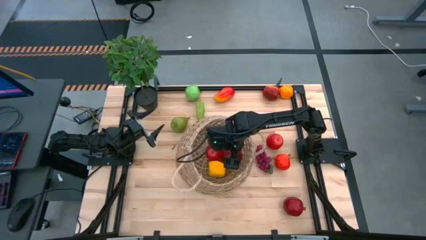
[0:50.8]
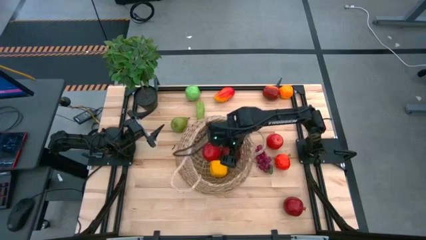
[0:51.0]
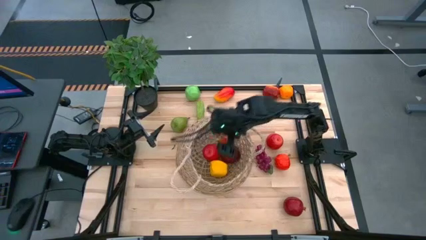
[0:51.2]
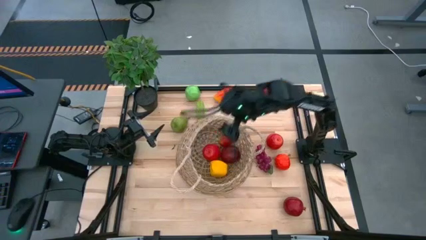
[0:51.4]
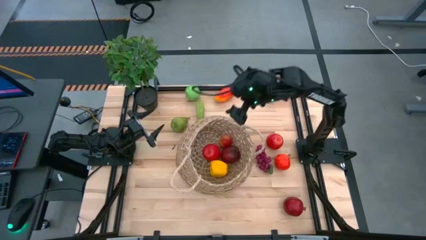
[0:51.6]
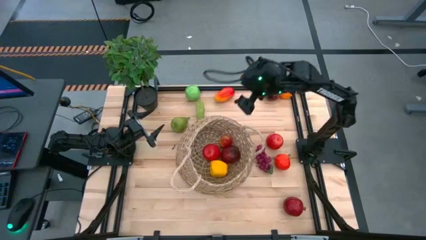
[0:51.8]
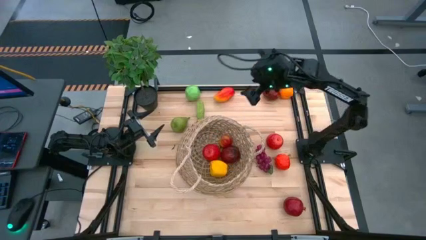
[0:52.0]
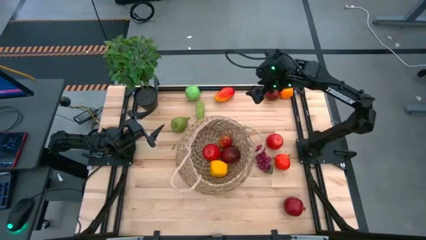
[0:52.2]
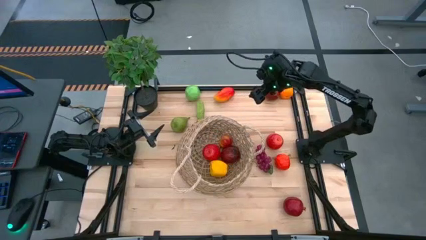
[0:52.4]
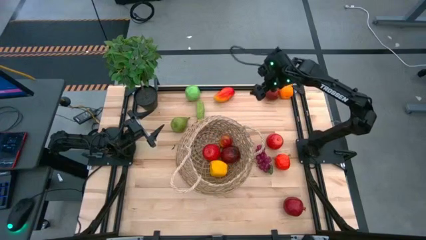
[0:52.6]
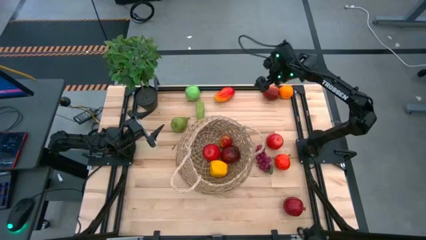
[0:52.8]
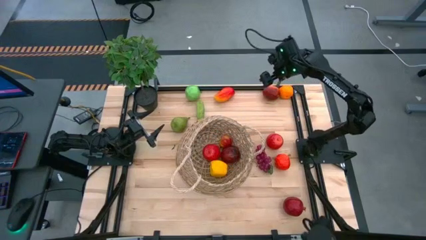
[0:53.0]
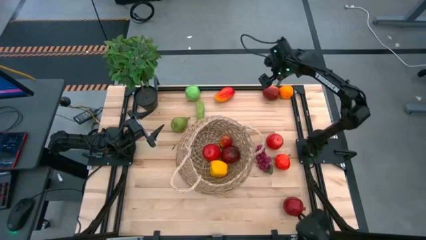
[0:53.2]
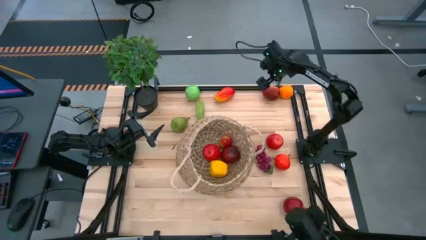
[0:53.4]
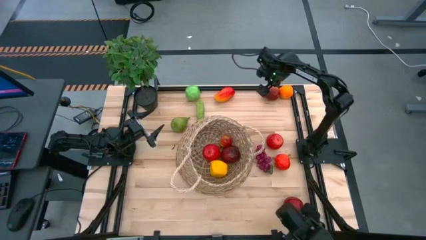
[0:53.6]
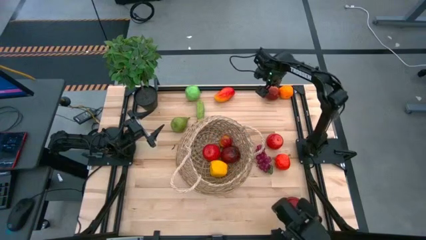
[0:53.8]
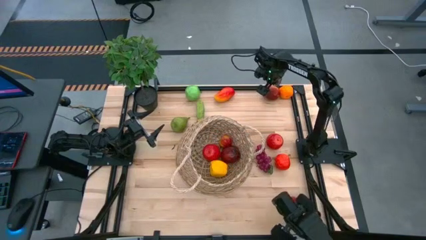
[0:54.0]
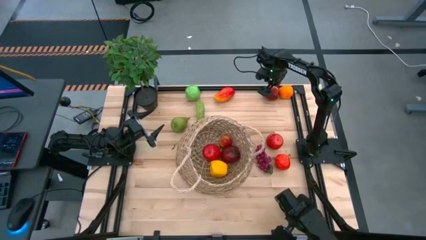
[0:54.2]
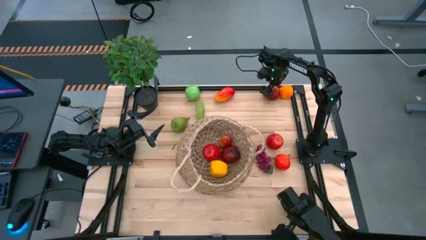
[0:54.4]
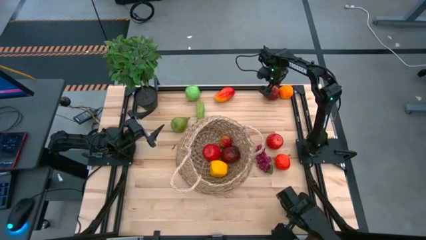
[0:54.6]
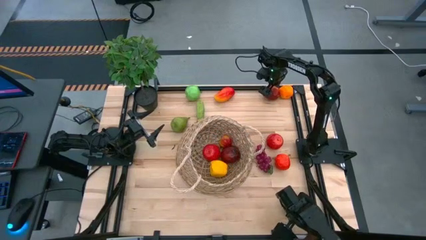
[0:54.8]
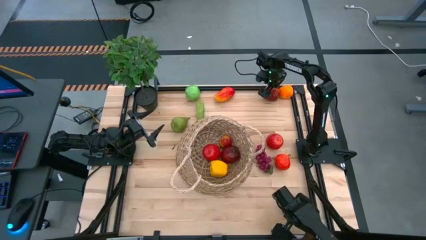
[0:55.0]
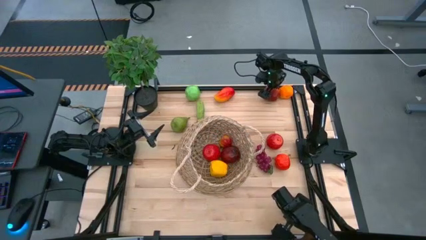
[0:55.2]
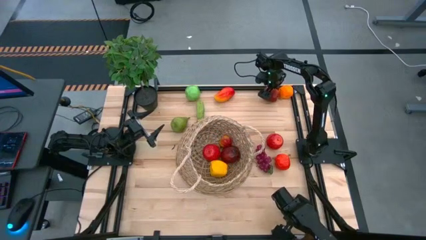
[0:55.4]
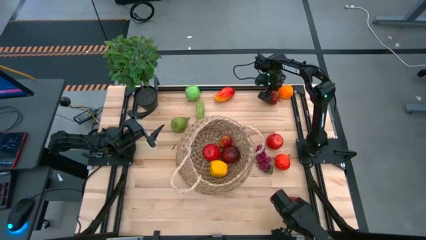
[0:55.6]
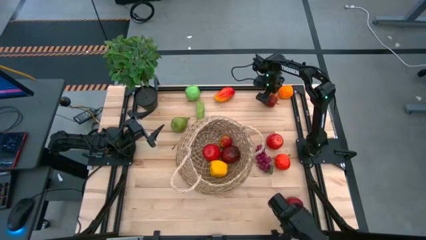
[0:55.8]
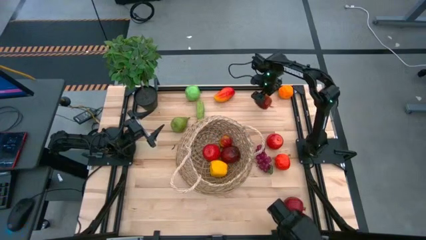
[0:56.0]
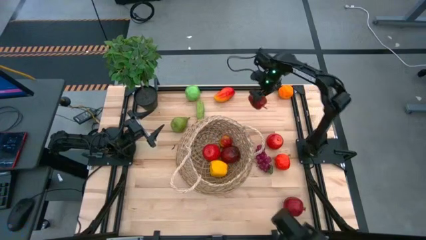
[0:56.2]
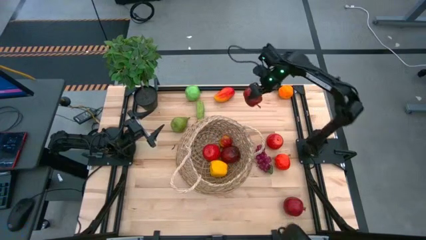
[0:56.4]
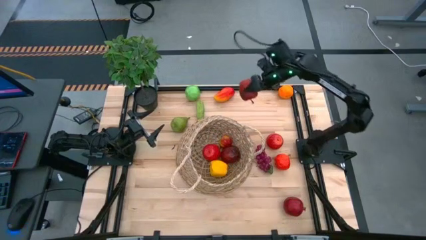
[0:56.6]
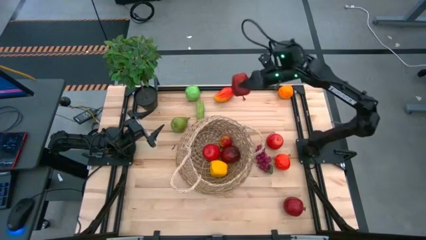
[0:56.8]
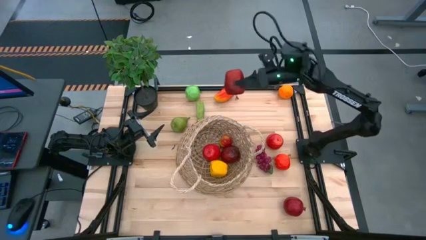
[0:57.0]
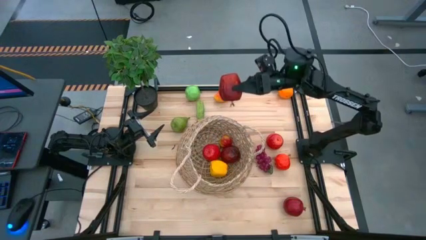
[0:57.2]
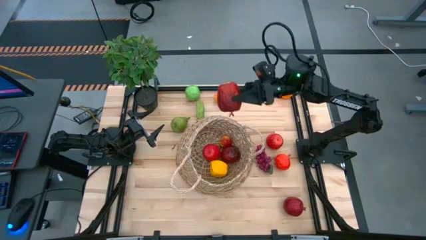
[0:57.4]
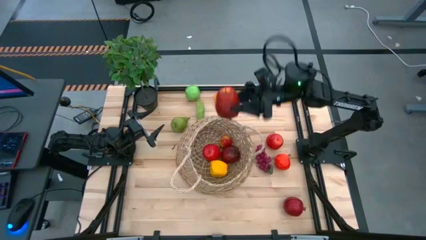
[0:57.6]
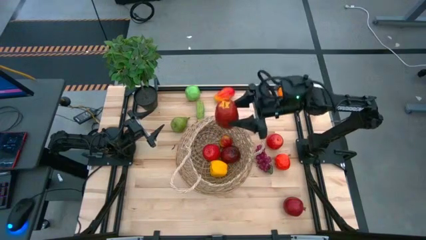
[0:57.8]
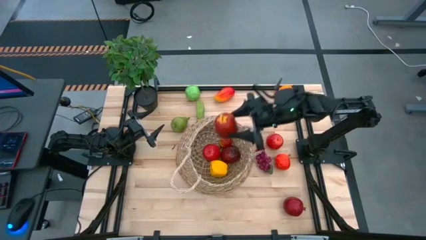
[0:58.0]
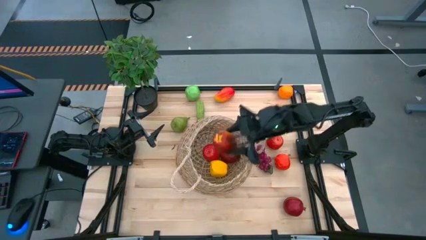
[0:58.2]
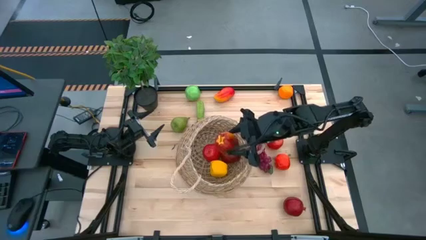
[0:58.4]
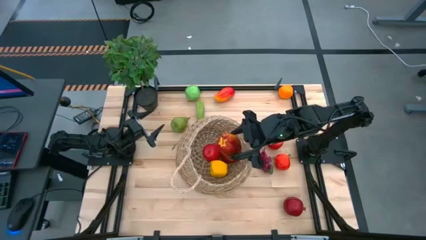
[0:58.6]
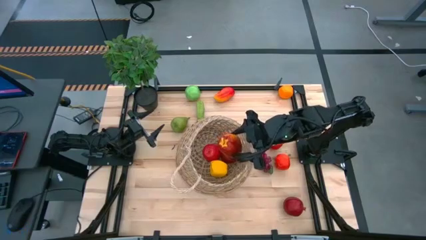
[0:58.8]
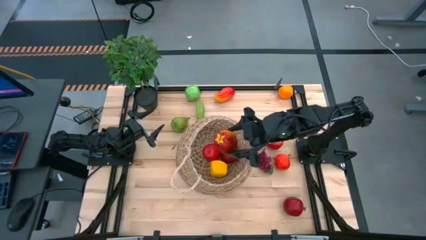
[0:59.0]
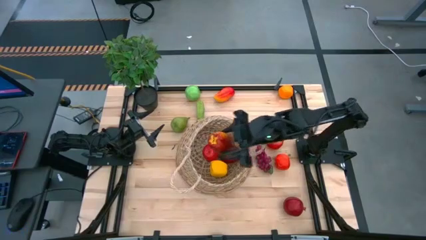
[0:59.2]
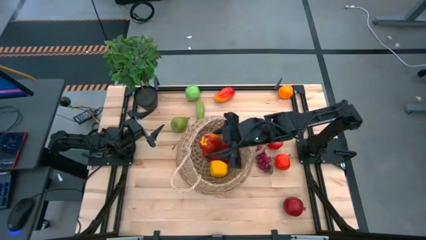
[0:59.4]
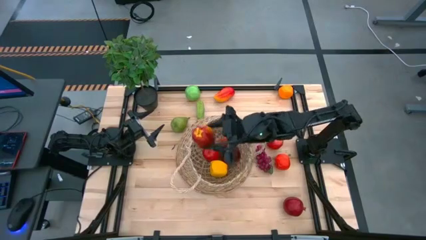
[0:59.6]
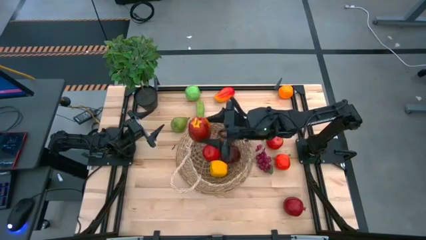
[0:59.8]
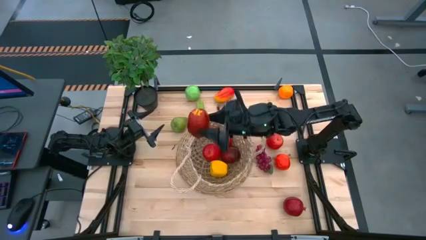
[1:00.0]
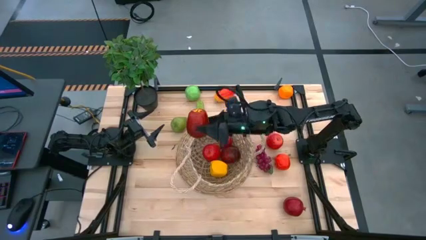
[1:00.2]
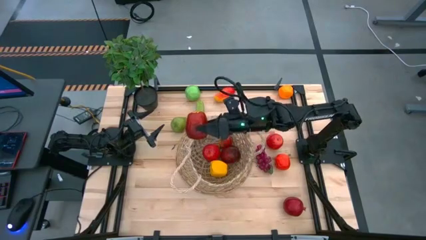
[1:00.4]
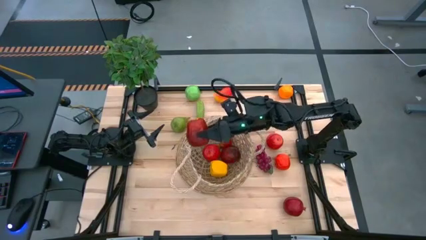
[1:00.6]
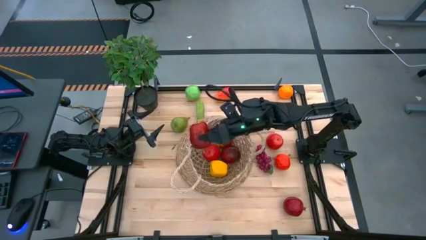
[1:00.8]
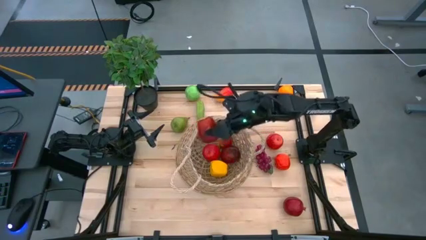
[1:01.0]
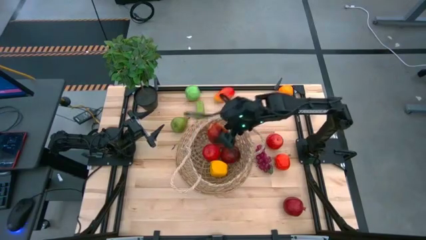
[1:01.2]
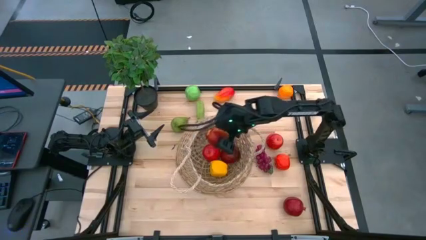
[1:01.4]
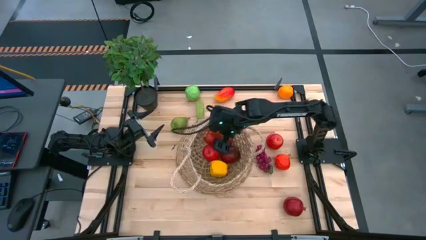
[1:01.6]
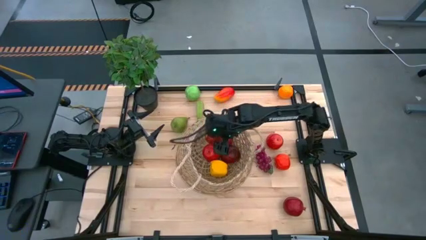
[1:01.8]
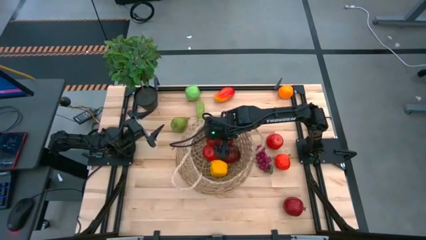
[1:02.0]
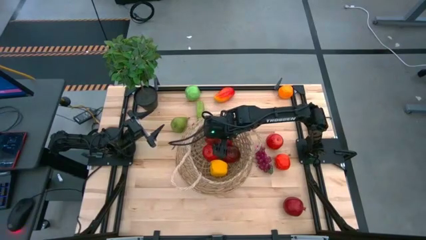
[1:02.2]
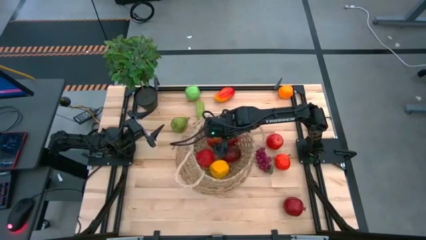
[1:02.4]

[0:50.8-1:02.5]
Task: Build produce basket
Put the top red apple into the woven basket

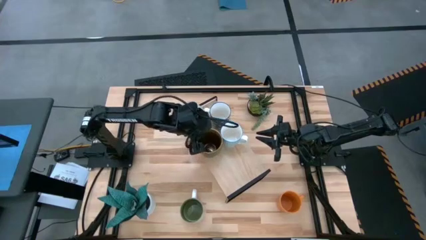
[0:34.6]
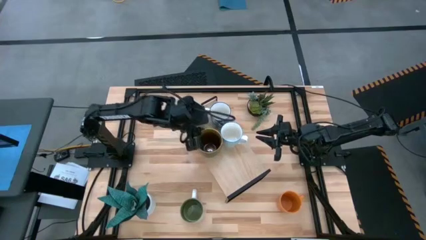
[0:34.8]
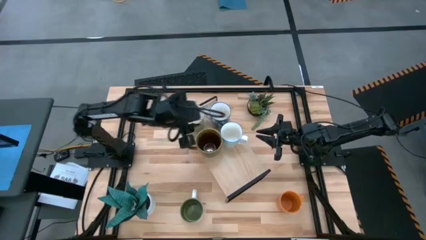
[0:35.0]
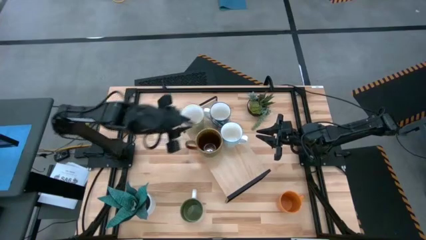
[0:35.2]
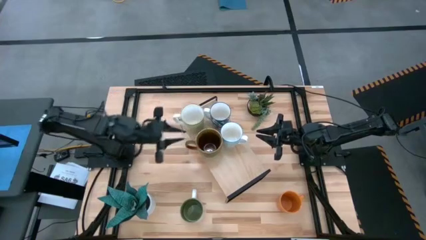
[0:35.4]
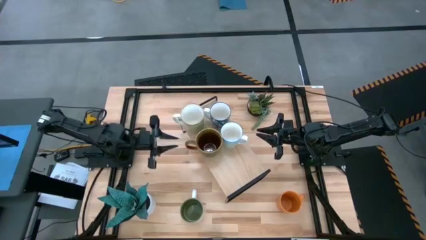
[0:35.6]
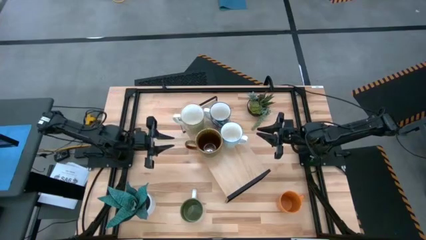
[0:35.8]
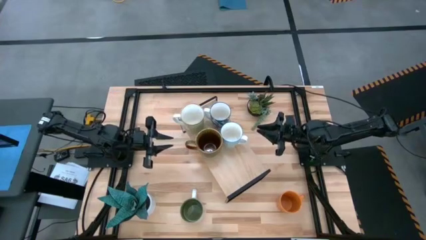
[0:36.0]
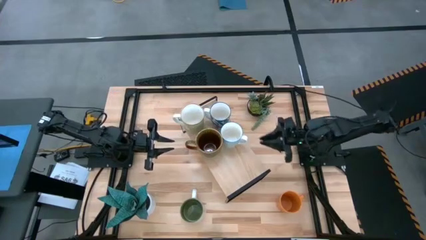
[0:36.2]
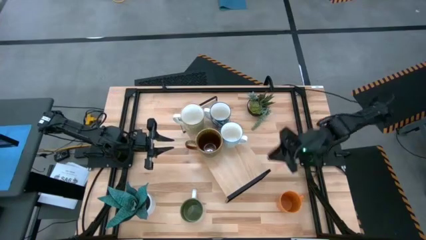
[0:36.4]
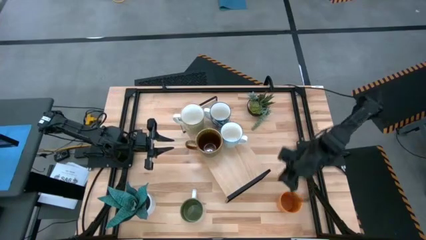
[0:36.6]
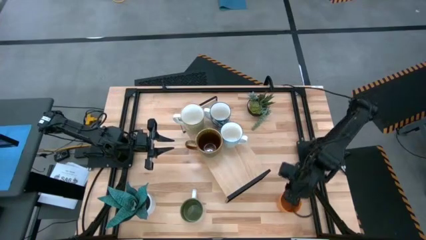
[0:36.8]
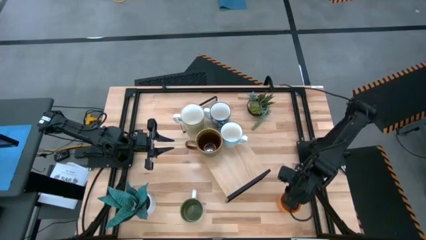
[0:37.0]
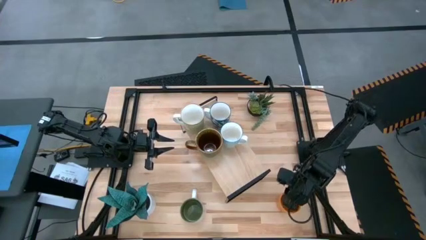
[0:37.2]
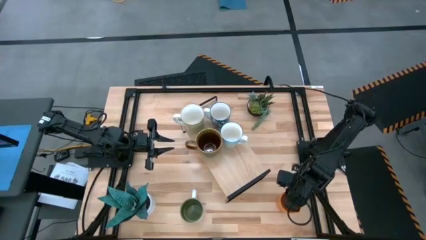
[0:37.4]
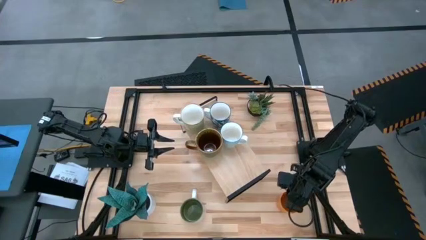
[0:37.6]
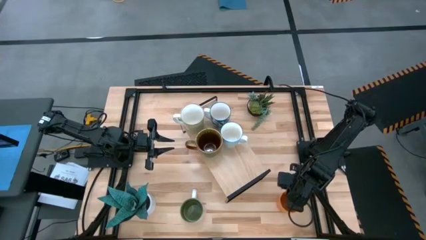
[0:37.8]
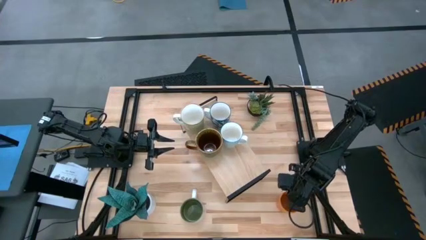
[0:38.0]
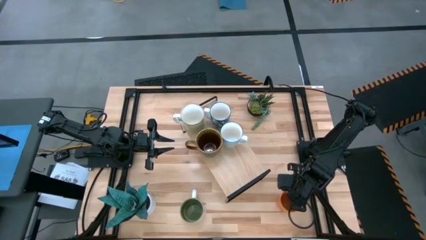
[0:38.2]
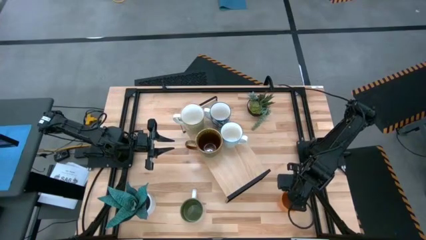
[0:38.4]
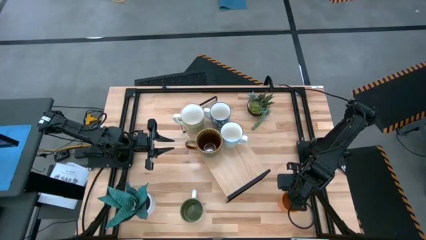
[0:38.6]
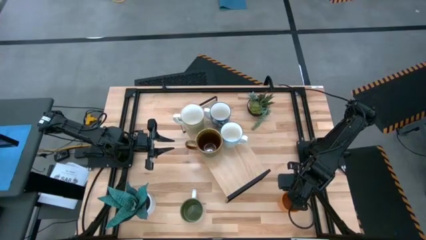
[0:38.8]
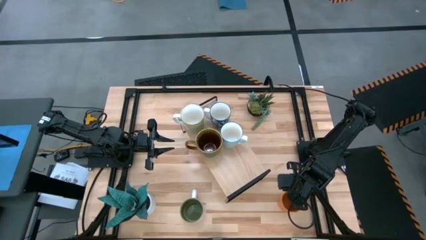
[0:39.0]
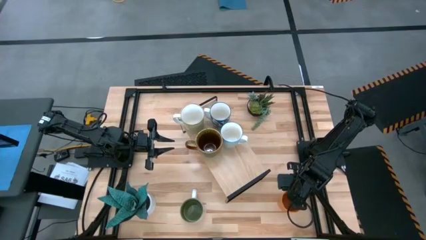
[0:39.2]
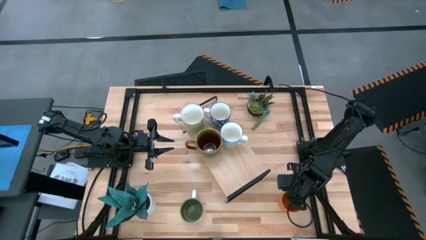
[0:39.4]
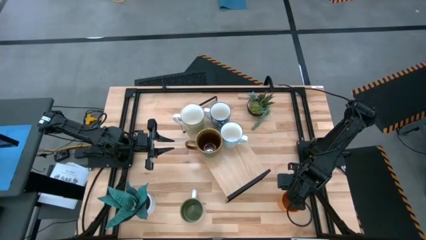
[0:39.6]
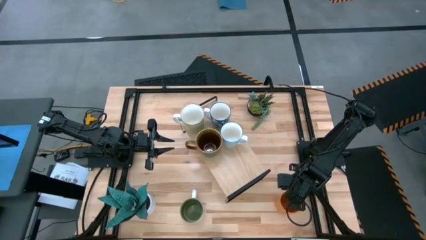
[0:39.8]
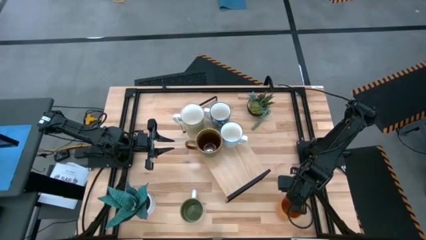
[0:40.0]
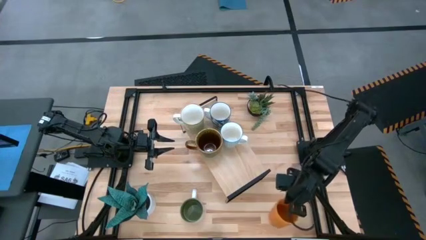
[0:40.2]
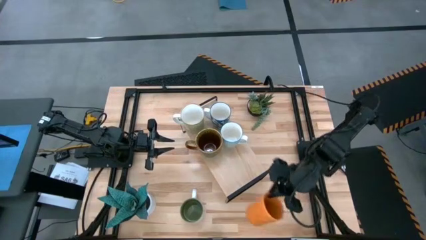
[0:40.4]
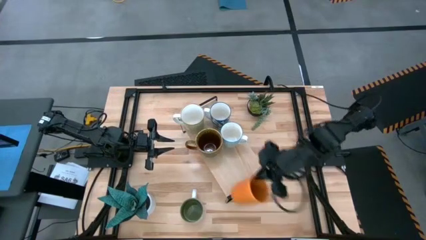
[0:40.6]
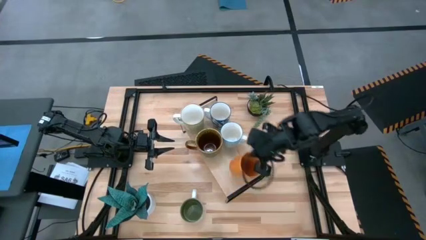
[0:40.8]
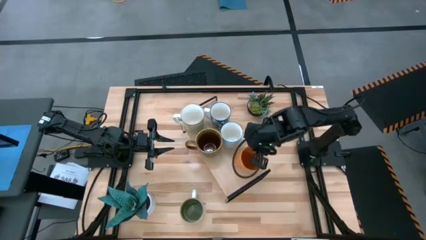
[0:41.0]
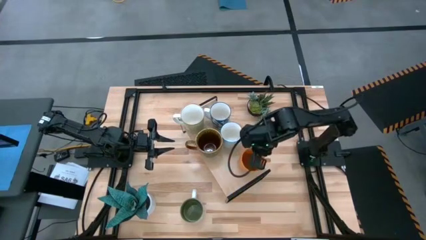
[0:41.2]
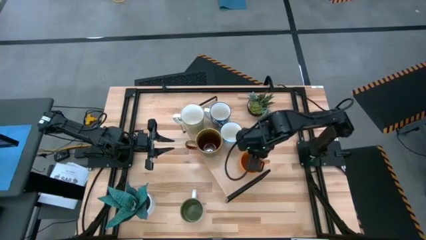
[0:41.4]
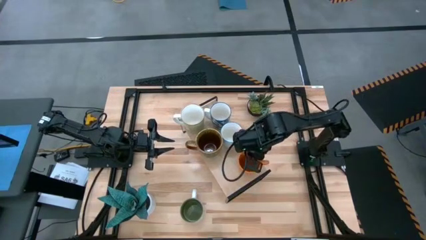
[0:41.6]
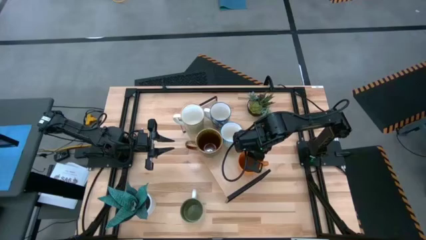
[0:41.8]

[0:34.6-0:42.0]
Task: Place coffee mugs
Put the orange mug on the shelf
